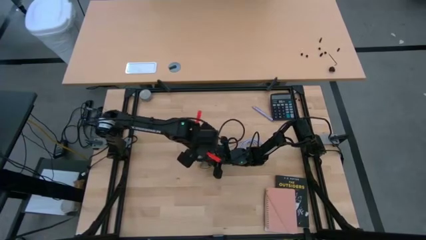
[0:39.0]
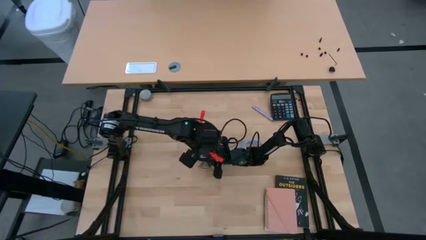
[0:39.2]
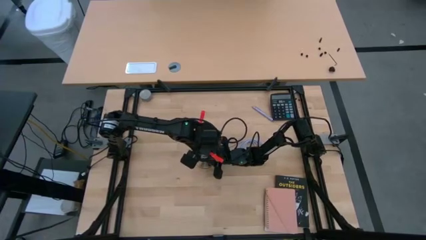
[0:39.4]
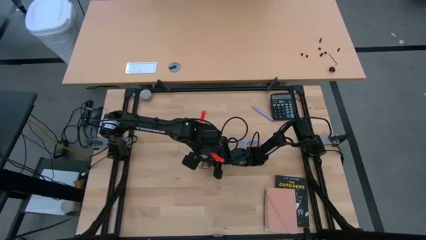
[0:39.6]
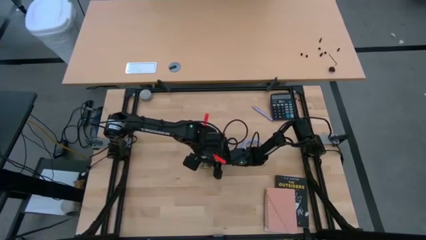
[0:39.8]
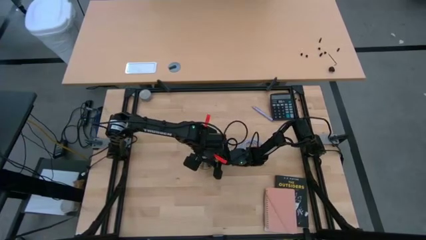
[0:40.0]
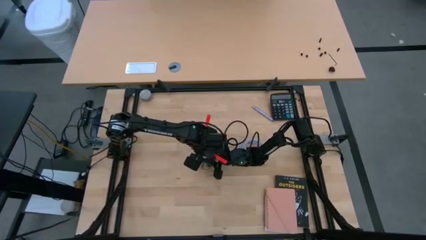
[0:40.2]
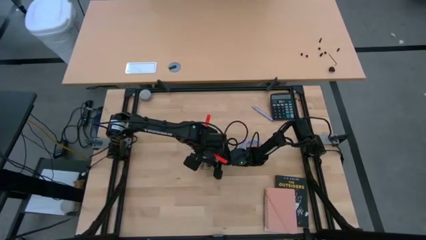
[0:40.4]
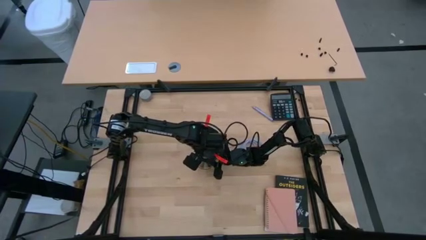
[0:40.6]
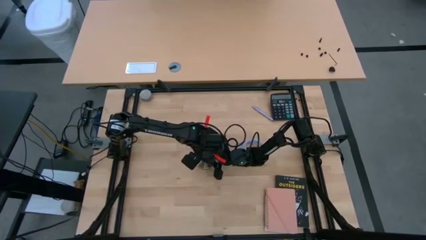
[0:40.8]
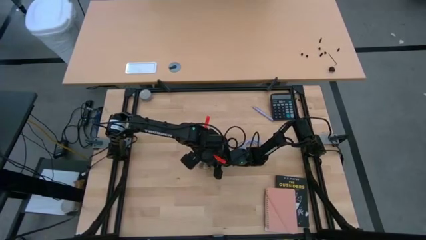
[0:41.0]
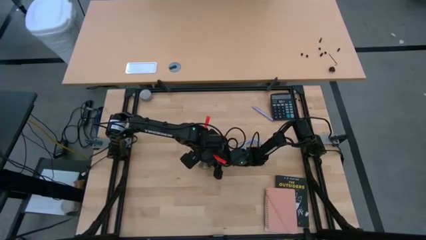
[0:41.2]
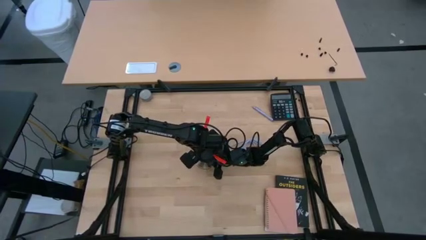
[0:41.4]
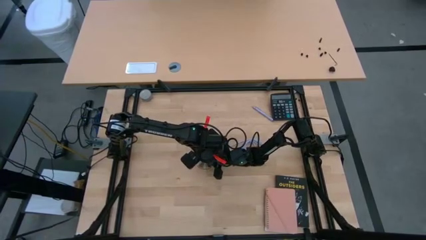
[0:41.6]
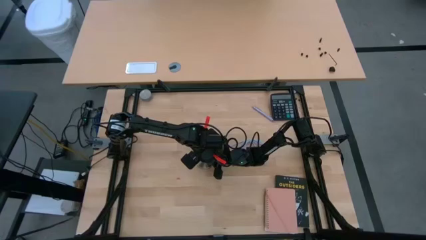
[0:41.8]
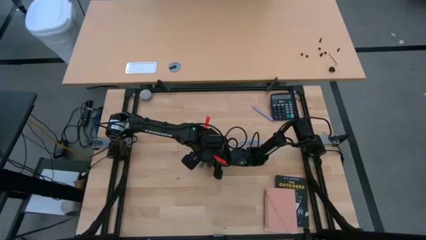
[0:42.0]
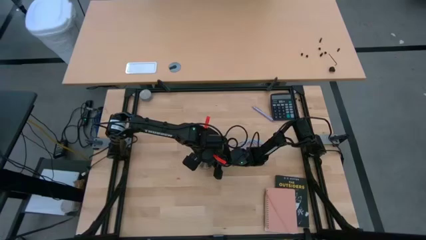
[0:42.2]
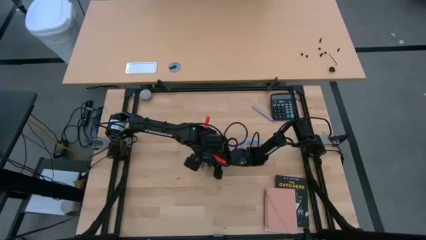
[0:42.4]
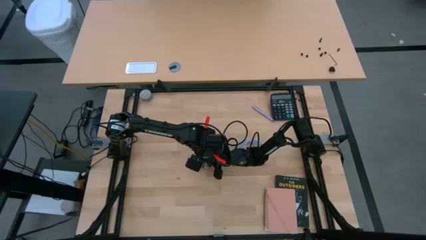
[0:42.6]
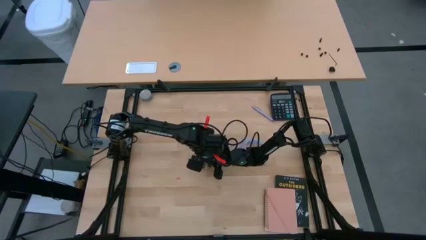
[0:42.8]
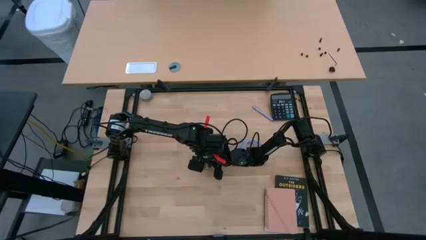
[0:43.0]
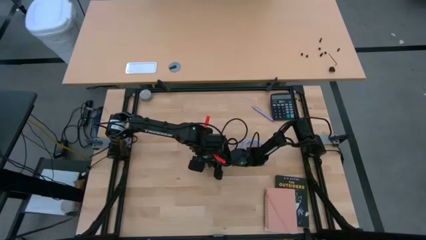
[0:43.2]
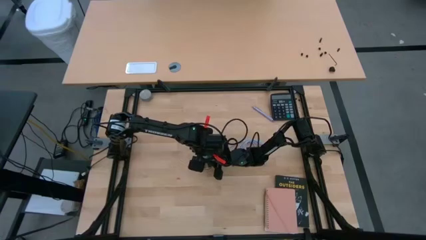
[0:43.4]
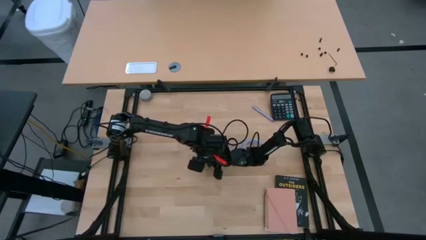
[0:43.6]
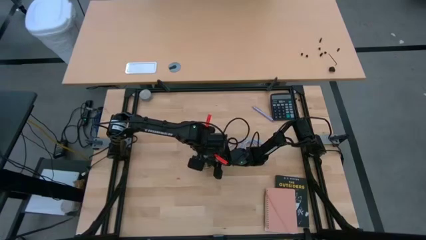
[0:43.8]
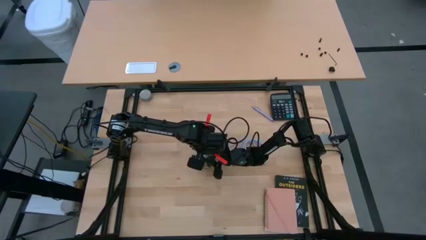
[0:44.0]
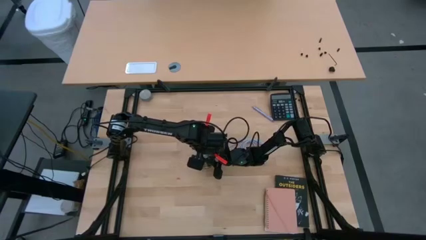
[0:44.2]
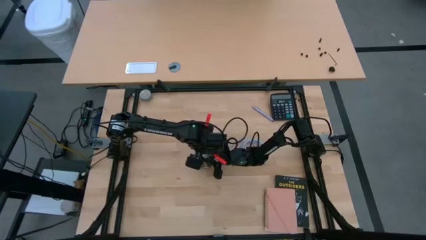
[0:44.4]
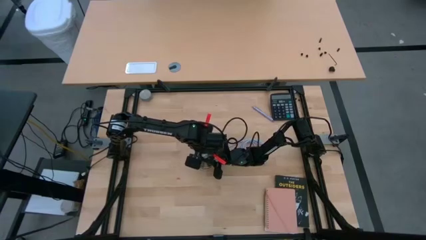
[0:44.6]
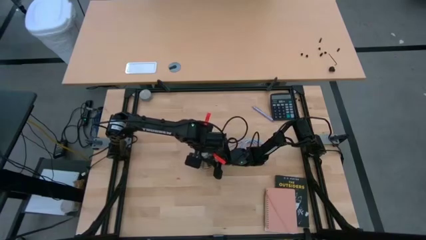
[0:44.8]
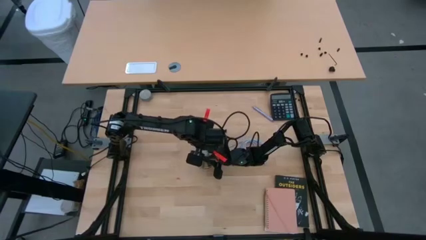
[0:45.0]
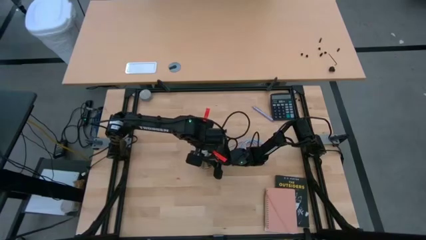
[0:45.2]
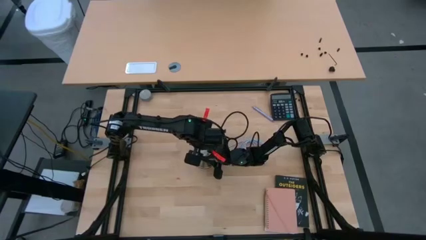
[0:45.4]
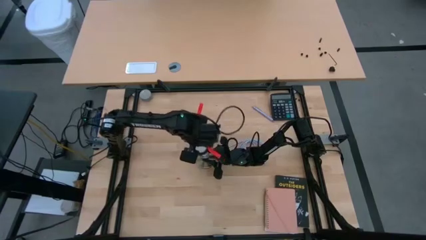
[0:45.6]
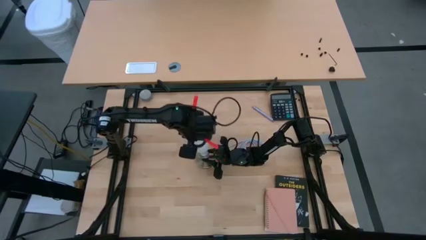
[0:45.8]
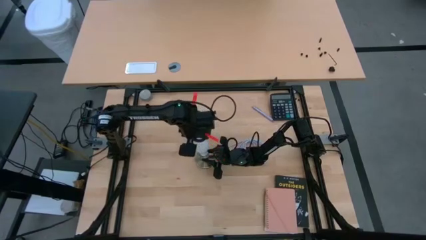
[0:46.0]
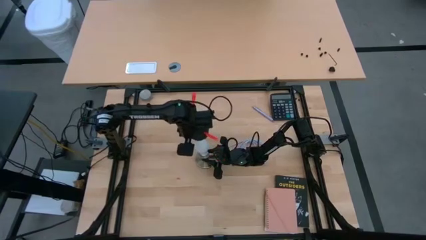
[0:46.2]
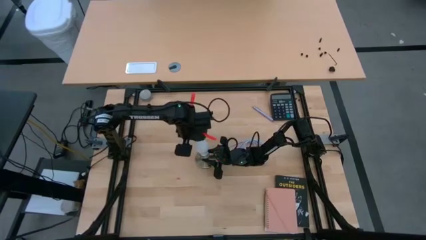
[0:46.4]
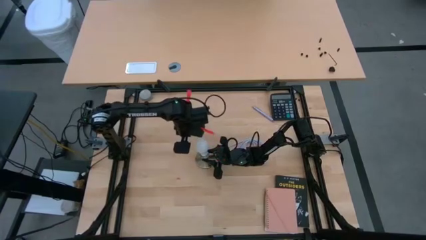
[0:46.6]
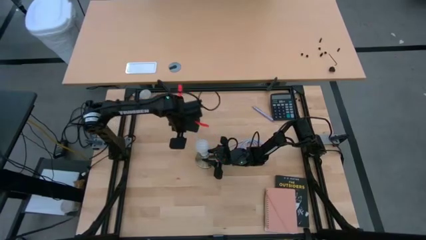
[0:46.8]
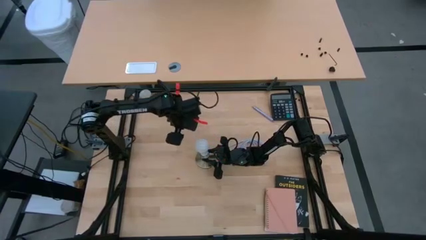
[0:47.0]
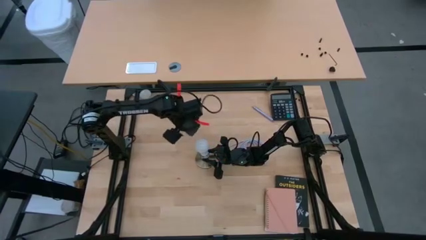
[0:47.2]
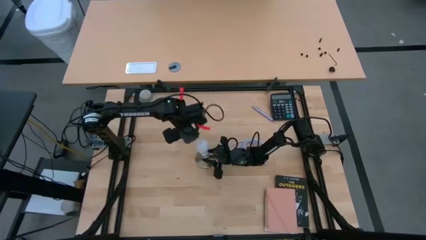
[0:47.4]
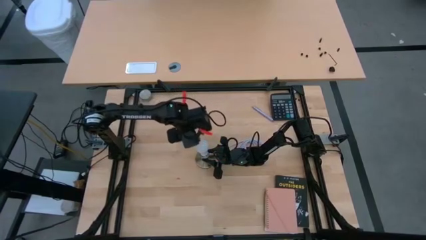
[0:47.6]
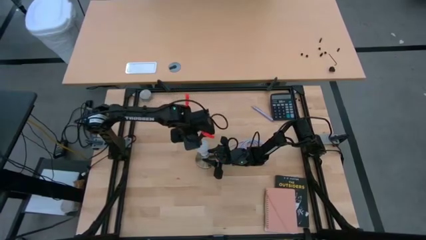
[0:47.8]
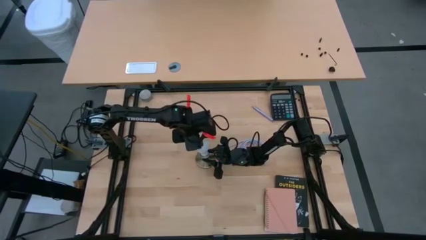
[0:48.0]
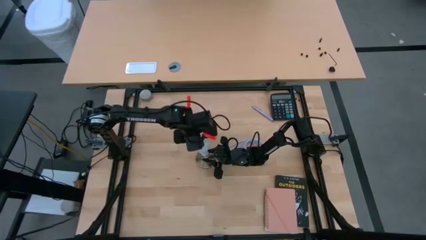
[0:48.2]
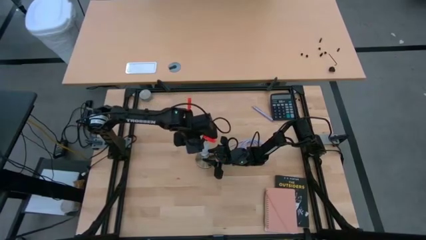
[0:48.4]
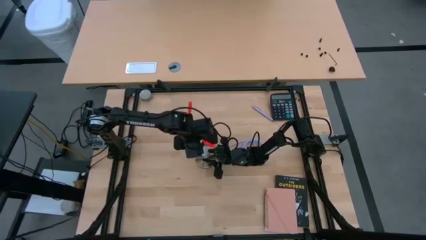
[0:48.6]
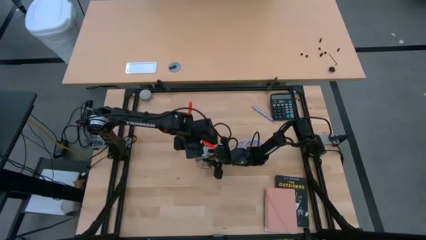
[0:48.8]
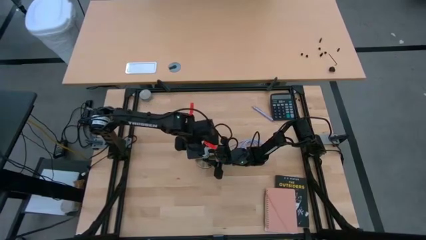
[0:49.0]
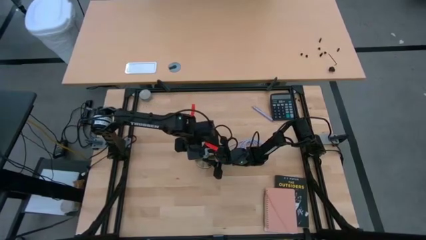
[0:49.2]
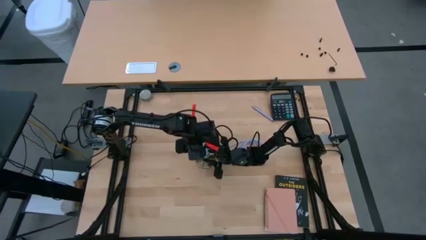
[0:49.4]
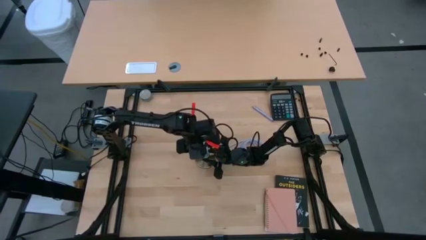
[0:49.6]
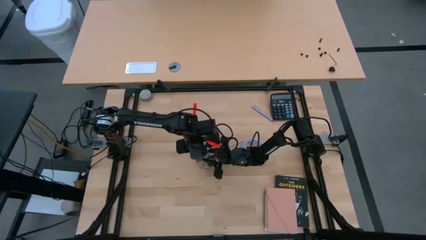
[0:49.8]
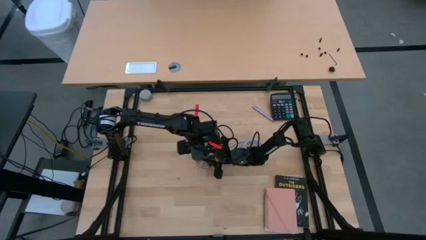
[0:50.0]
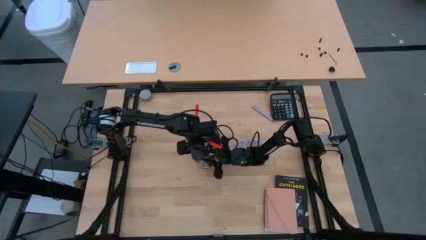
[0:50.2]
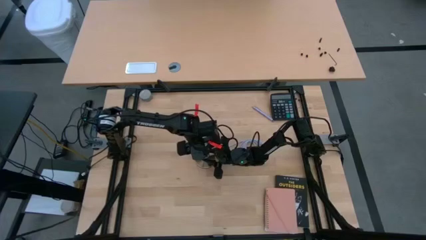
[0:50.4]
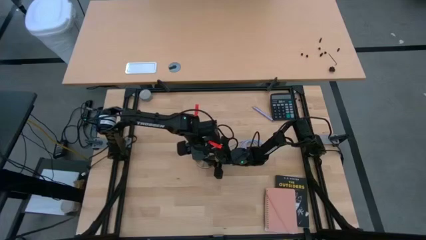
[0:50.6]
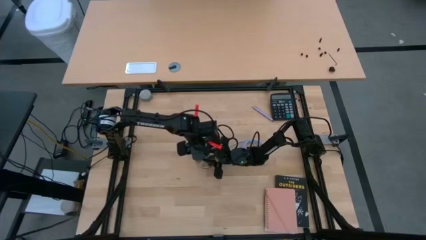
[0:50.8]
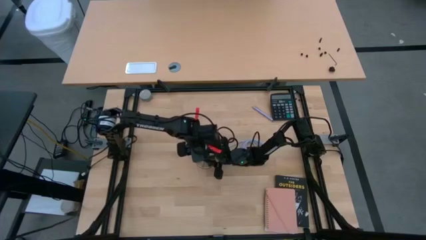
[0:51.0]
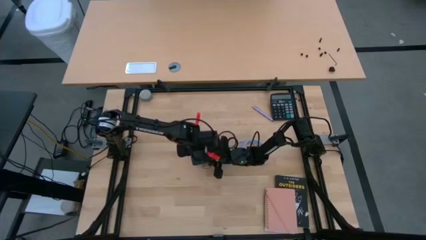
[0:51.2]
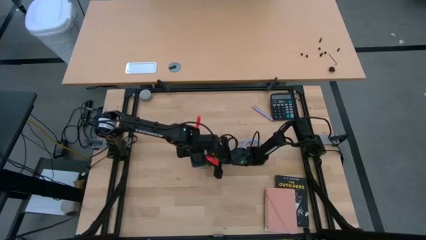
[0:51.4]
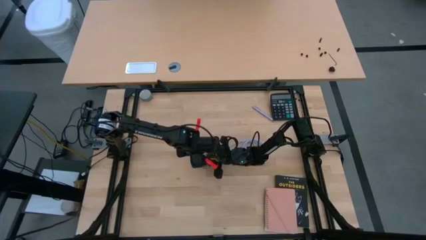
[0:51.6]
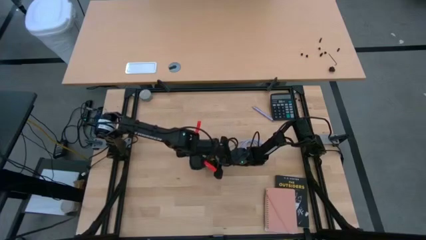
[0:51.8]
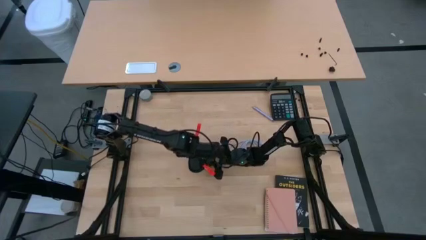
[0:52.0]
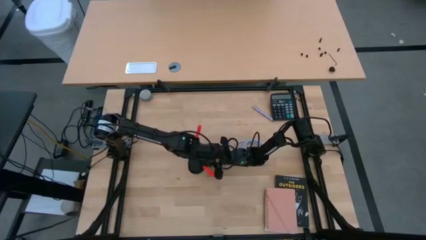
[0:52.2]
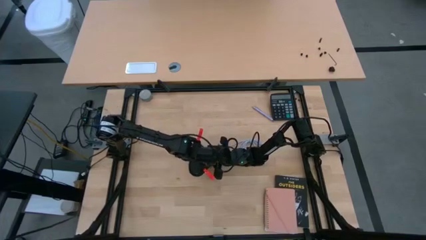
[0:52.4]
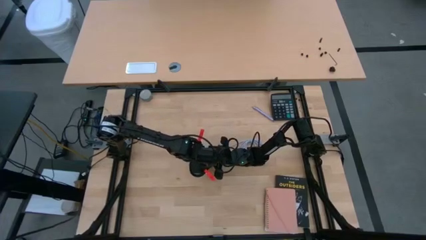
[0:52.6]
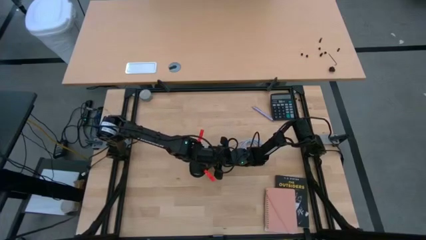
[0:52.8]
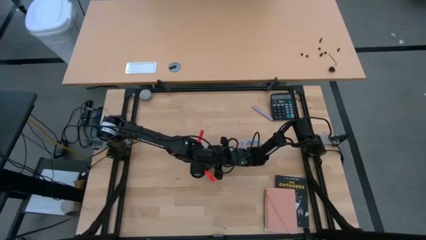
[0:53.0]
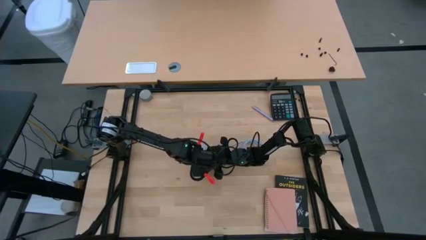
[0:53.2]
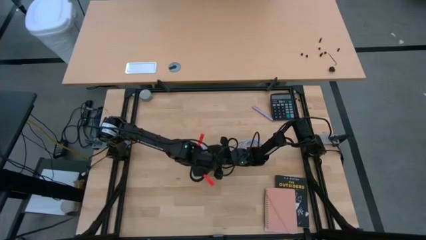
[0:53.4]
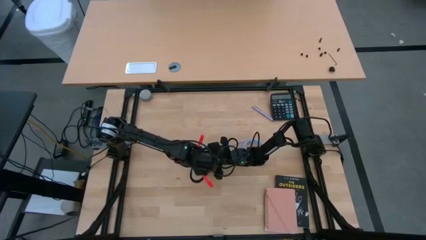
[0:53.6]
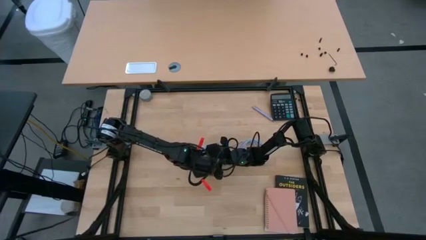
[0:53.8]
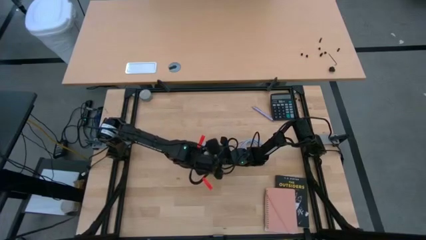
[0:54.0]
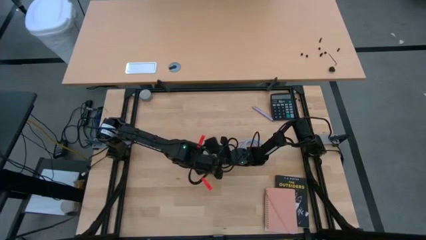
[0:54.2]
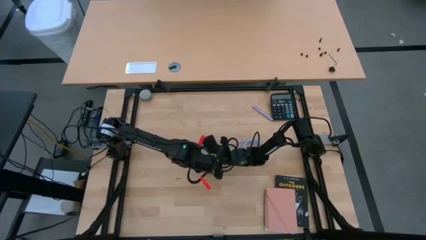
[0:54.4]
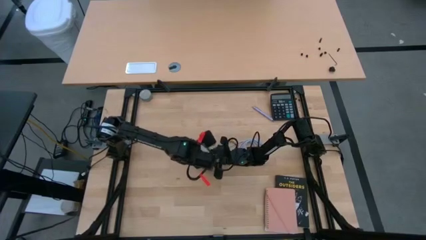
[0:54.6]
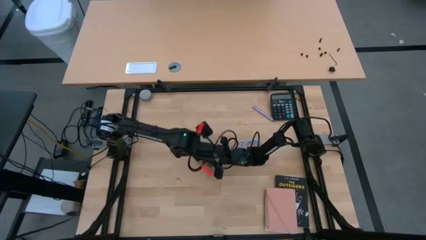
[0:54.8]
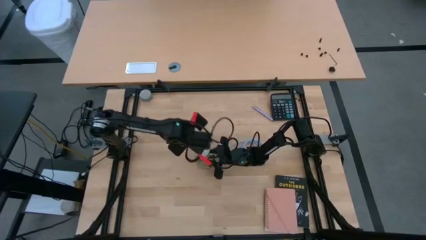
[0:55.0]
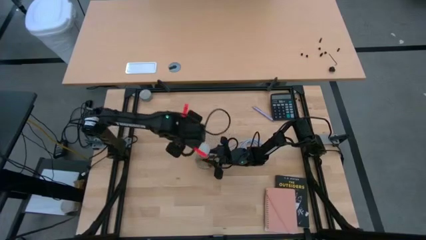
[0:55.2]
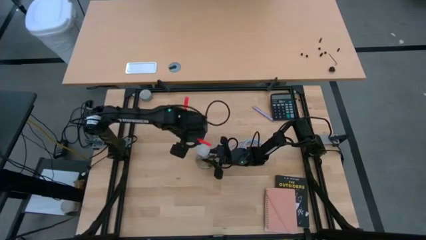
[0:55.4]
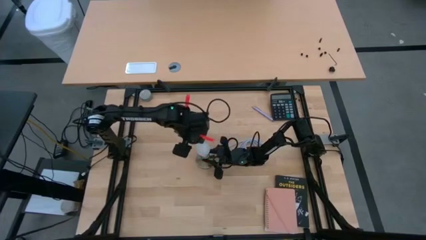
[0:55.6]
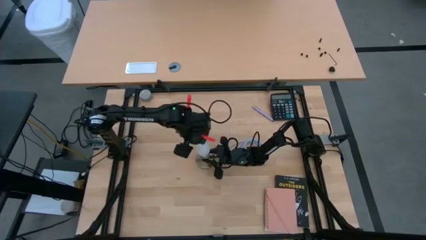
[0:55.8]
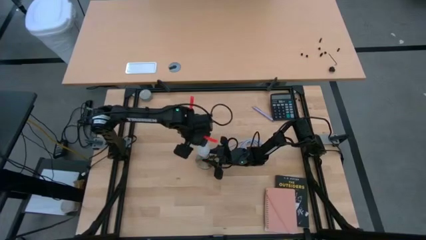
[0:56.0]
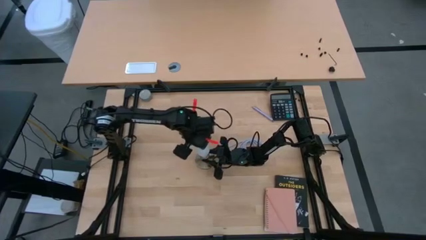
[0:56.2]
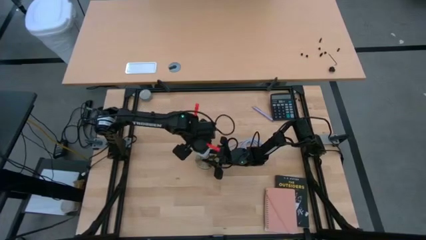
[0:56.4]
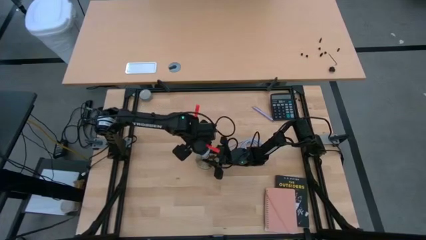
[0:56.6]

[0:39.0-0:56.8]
Task: Screw lightbulb
Insert the light bulb into the lamp
